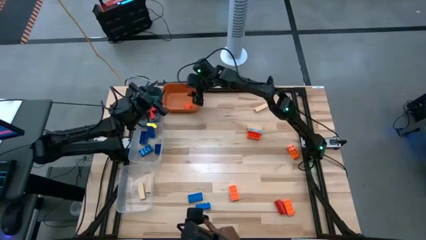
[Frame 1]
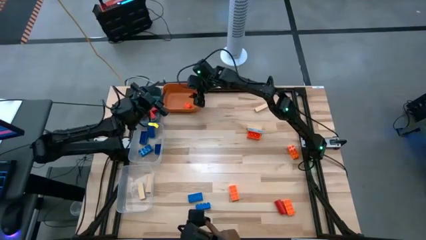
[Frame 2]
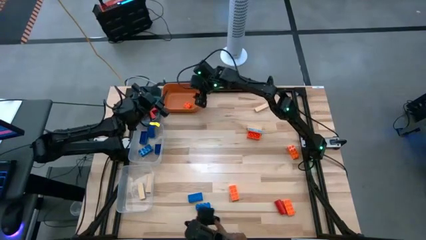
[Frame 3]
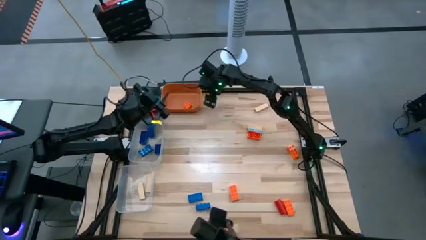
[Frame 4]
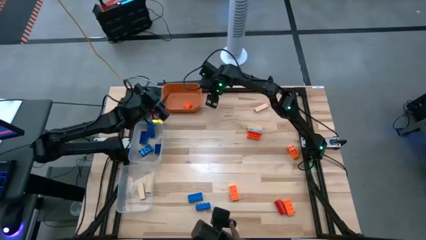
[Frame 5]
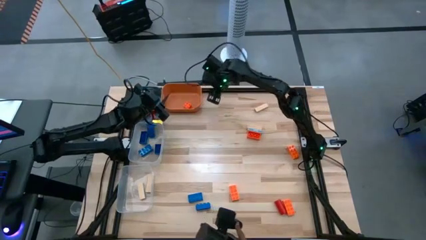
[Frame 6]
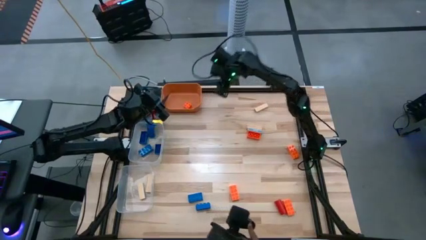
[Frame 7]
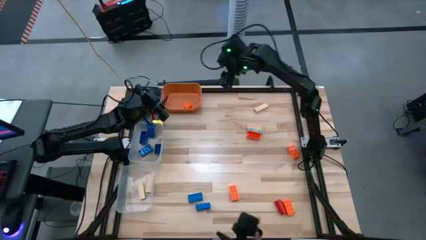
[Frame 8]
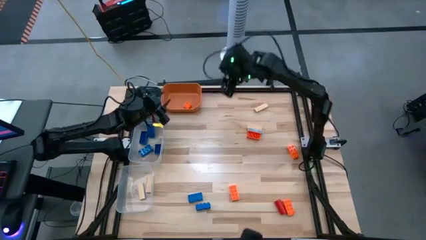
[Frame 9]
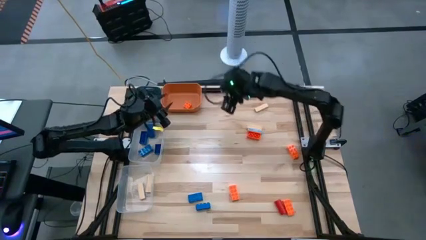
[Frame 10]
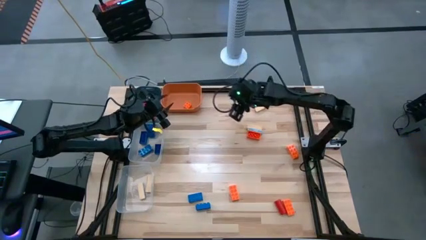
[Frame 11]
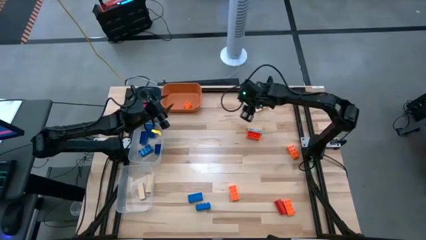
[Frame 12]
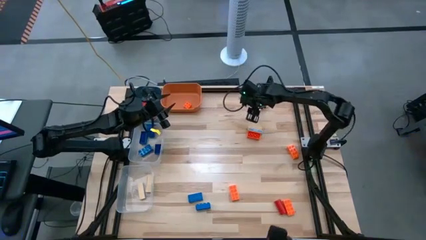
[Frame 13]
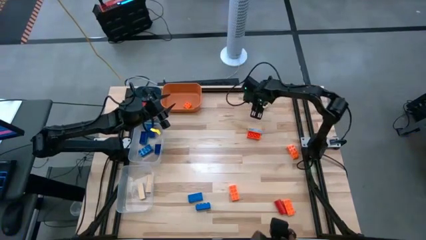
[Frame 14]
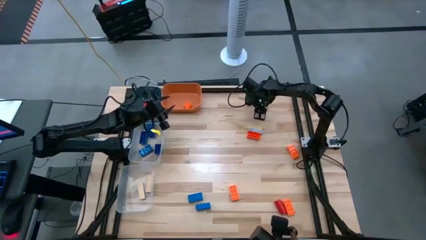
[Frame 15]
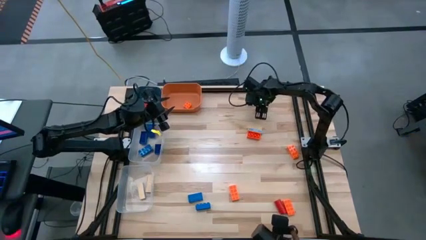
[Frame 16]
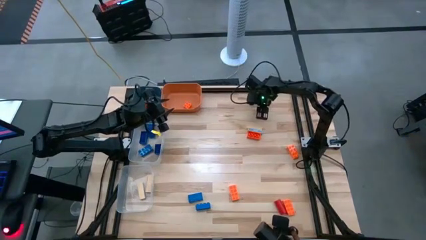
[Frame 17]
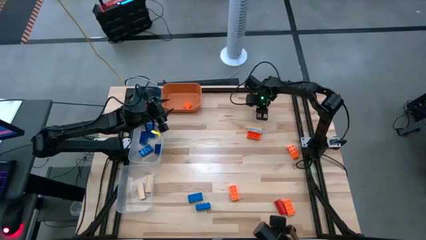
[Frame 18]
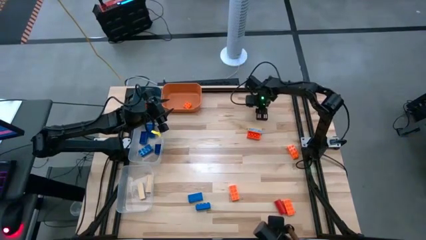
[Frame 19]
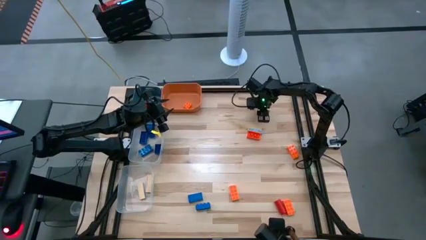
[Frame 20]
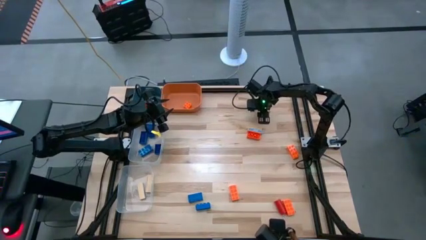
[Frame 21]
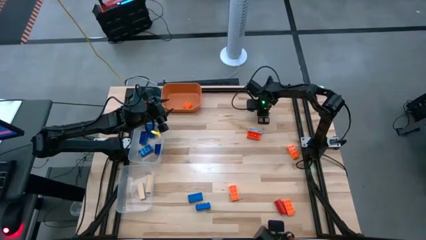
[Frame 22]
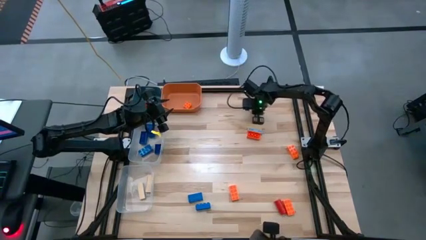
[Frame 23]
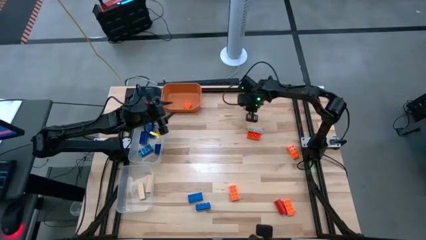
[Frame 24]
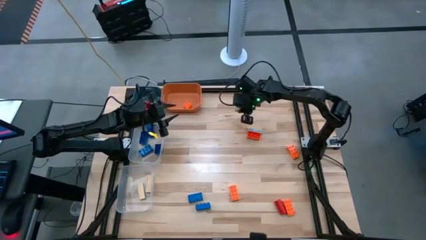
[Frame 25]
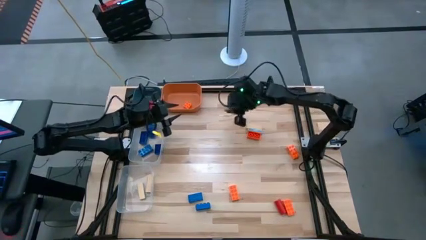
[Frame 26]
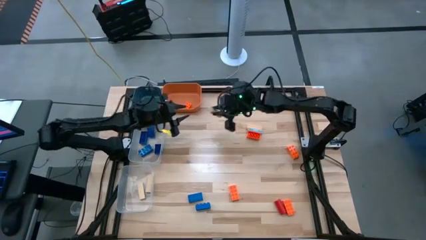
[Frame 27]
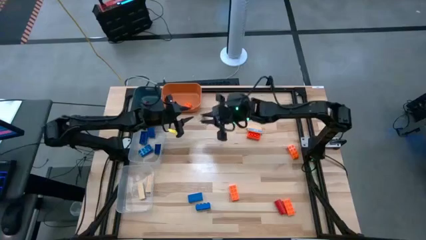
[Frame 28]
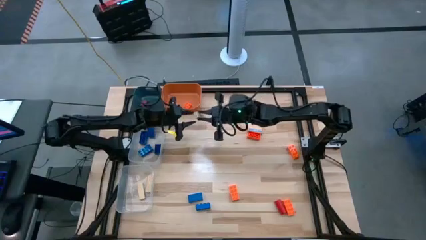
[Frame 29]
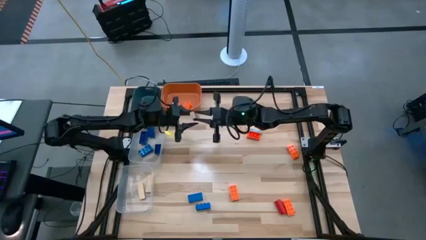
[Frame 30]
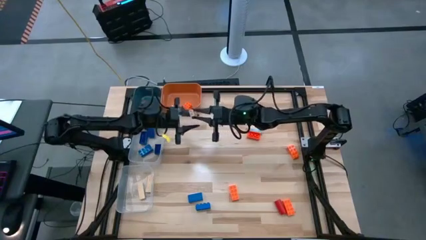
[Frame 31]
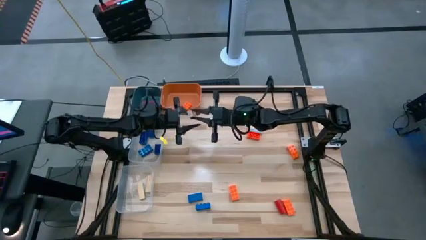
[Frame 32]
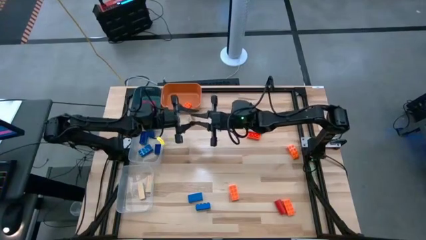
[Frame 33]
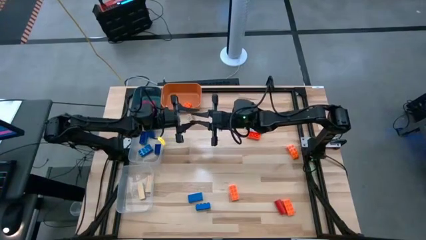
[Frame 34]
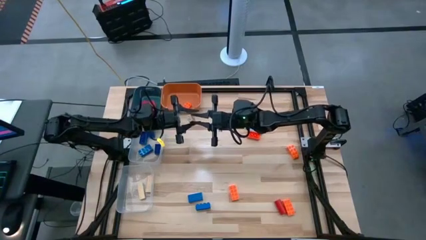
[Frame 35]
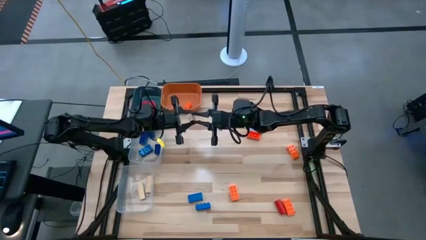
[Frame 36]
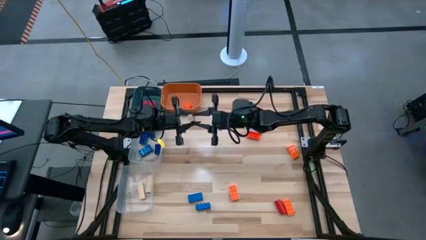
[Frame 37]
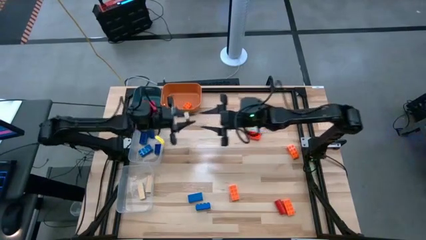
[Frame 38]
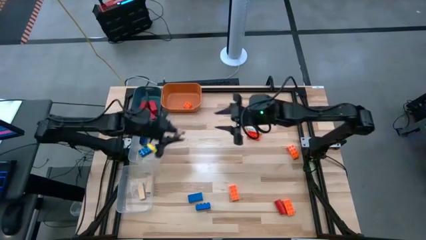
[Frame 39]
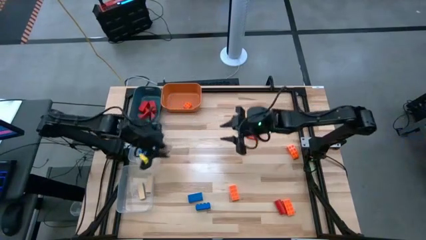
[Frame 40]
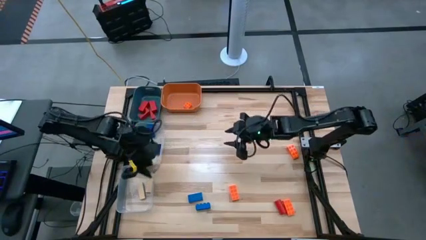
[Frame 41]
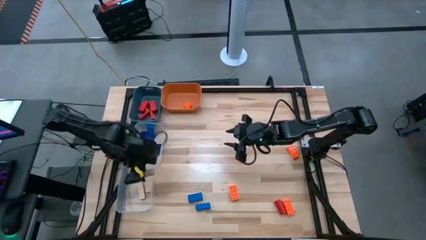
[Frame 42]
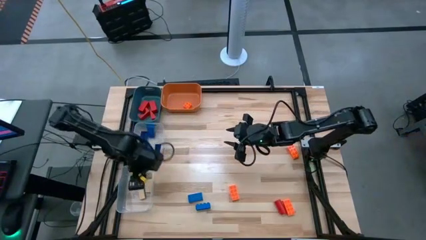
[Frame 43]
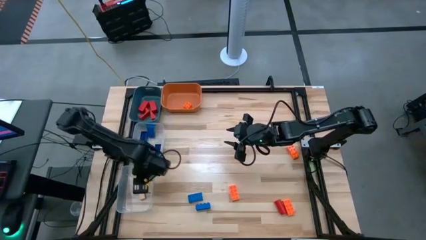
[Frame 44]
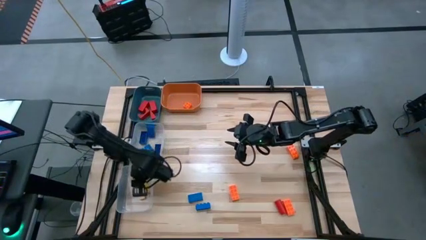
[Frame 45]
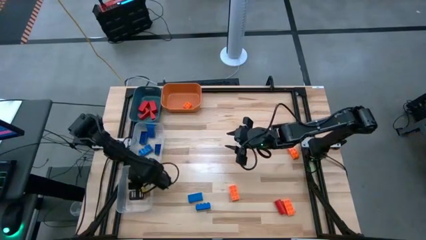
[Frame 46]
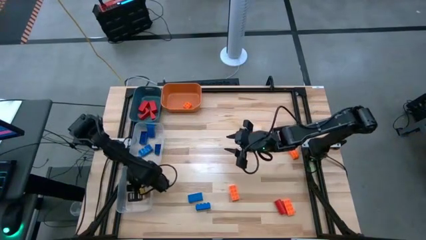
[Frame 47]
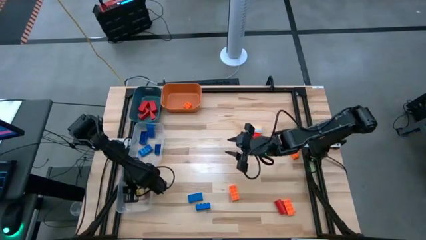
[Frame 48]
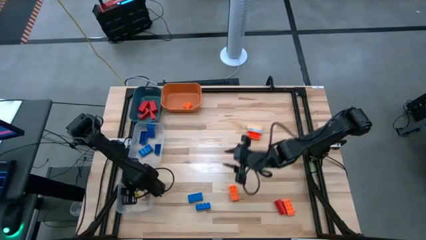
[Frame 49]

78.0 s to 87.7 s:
Task: Sort blocks
Put the wooden brown block into the bottom transparent bin

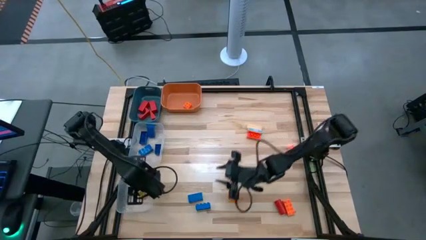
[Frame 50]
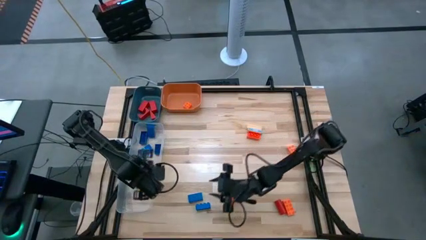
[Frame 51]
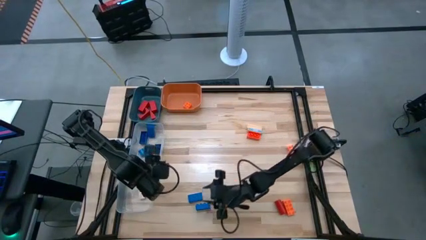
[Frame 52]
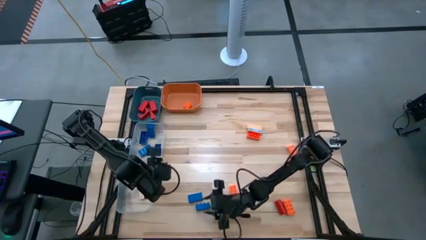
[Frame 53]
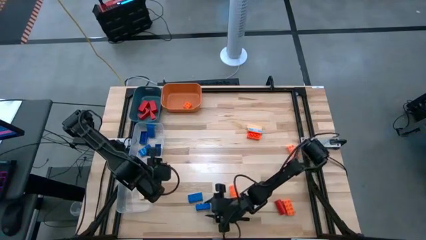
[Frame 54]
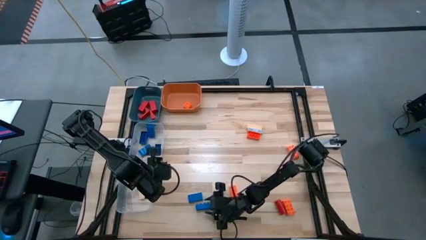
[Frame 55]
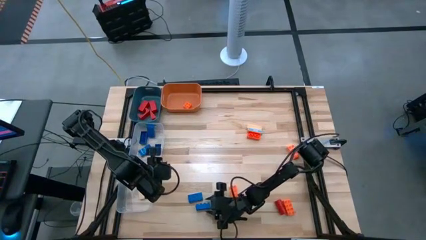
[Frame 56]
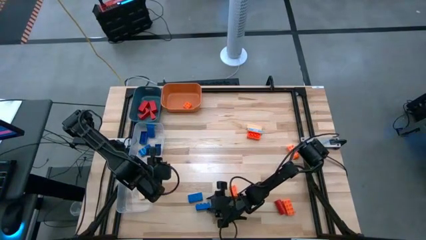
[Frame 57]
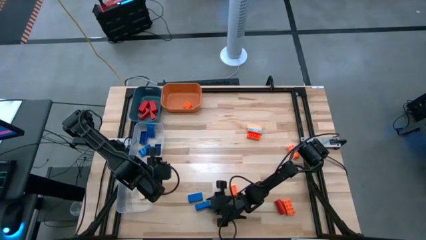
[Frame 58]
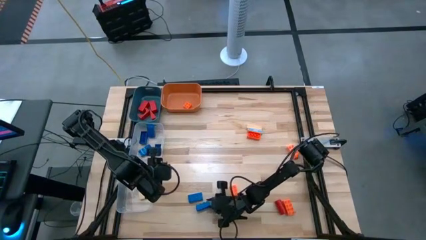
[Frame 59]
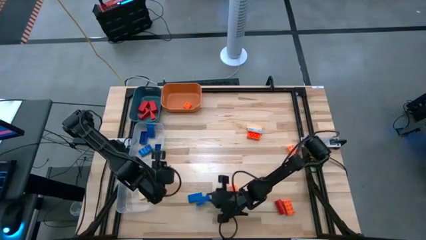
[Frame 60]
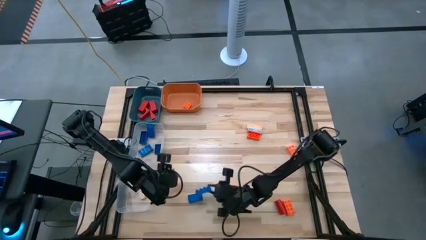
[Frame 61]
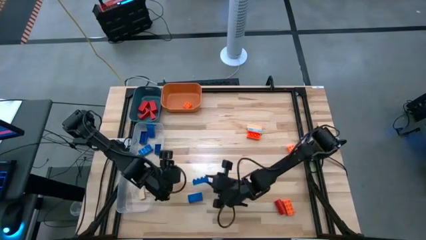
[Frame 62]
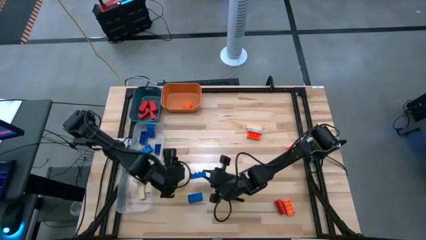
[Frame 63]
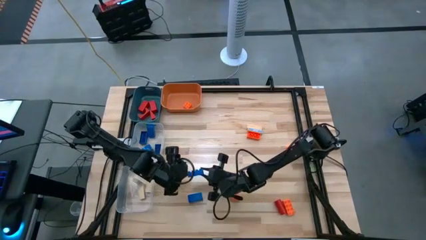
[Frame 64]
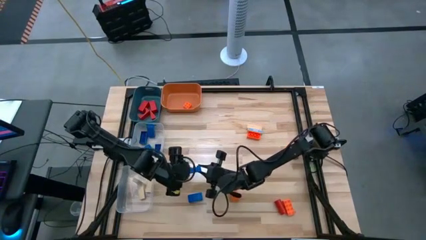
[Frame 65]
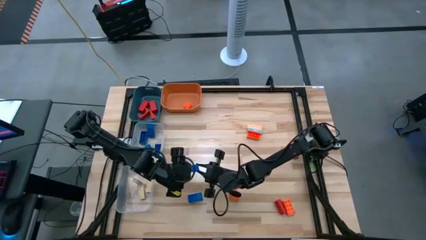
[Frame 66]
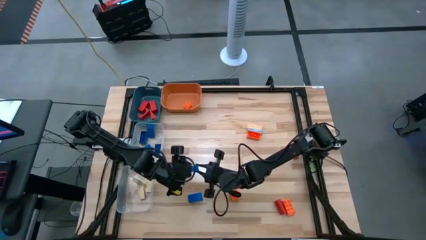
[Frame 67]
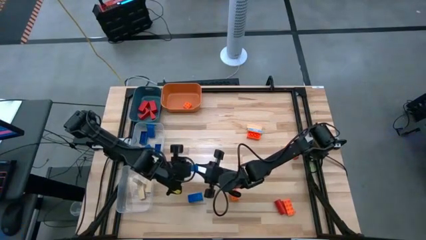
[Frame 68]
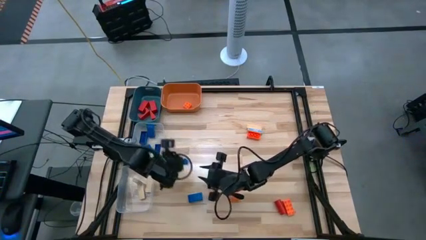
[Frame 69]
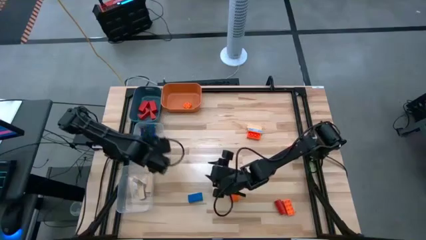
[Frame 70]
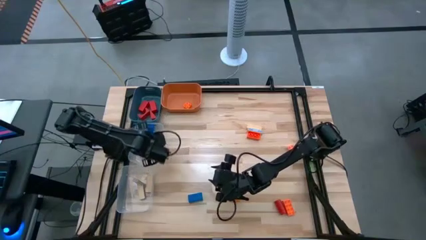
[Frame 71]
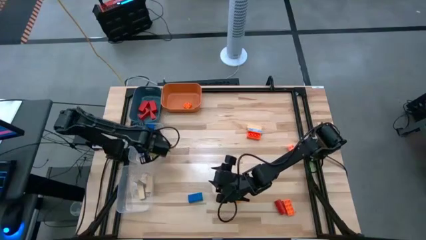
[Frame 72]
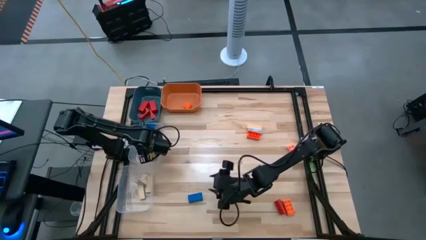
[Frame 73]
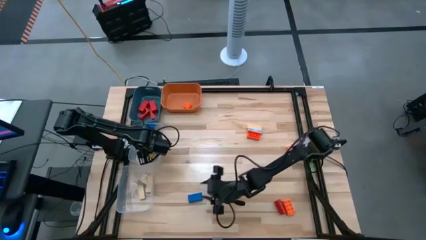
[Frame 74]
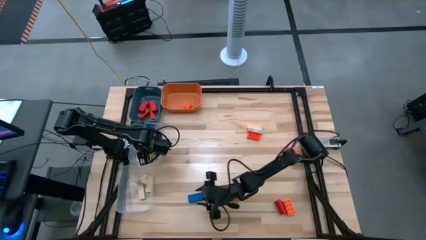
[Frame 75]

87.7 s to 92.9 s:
Put the blue game piece into the top transparent bin

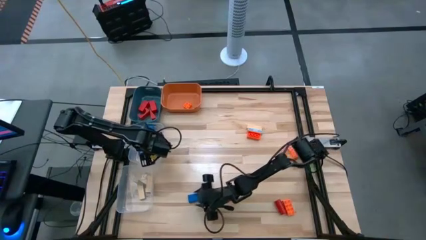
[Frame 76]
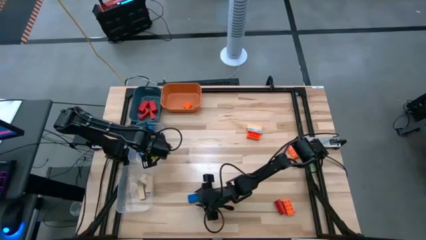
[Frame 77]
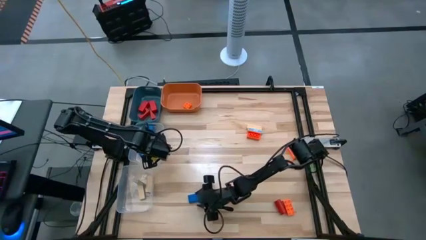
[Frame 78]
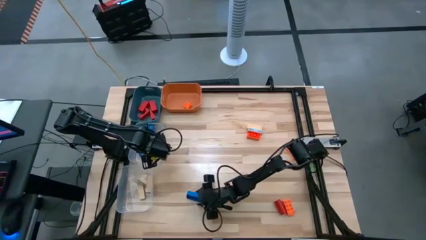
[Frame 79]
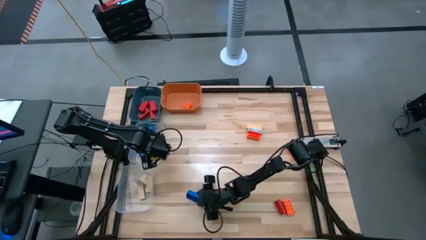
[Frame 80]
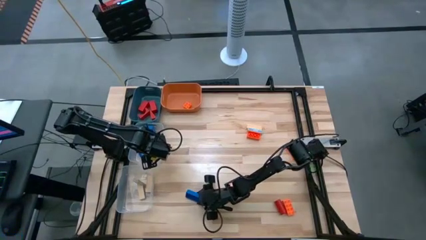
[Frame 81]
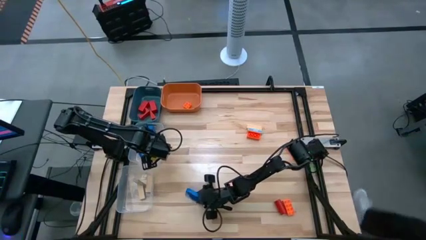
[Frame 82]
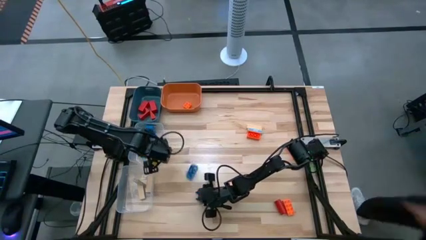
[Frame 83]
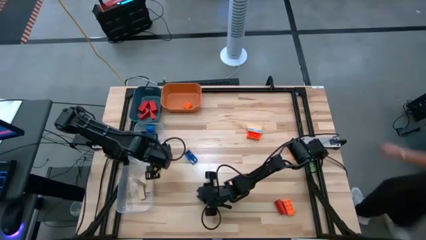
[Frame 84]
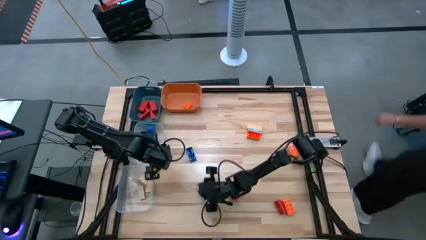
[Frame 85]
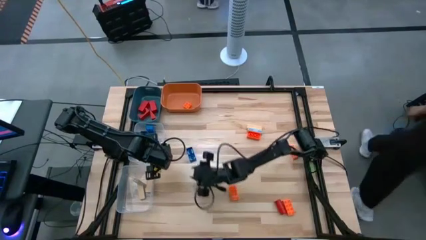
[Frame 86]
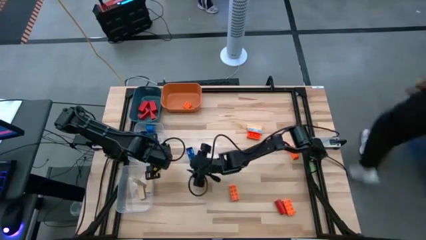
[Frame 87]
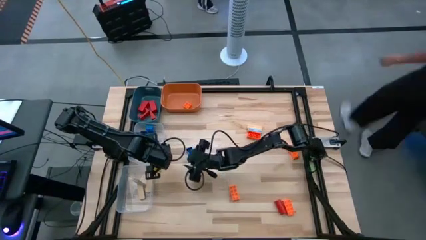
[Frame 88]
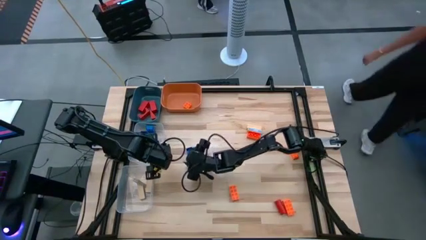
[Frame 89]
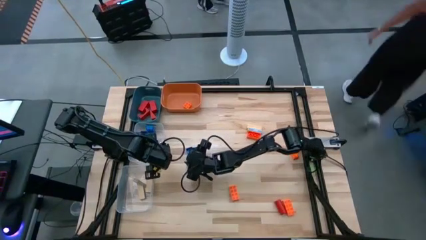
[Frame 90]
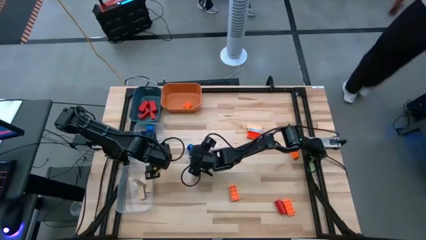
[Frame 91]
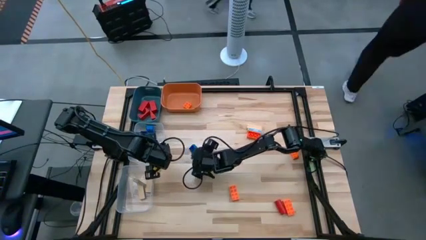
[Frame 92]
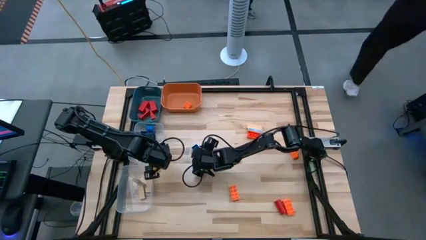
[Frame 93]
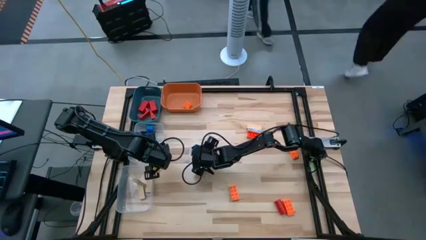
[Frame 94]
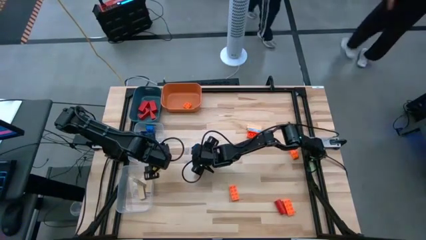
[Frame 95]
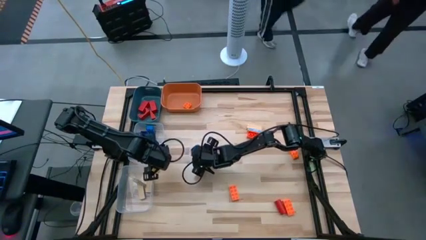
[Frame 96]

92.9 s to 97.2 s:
Put the blue game piece into the top transparent bin
